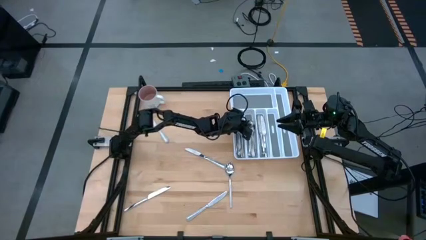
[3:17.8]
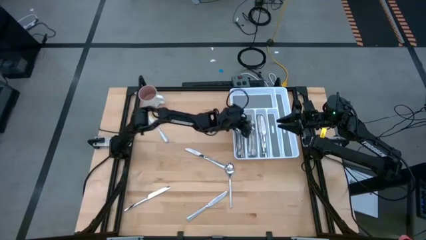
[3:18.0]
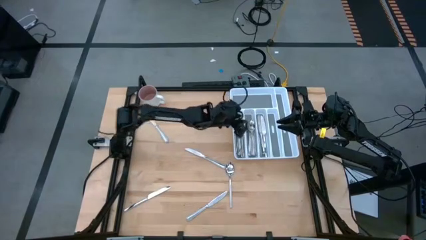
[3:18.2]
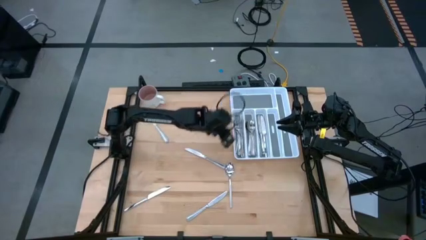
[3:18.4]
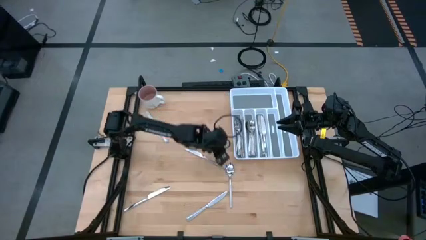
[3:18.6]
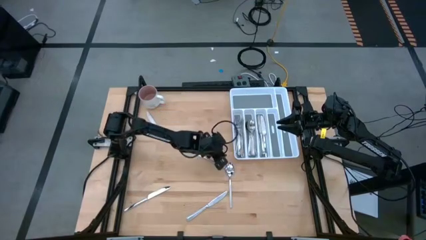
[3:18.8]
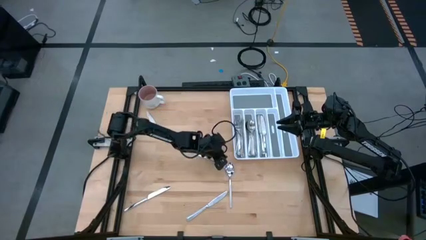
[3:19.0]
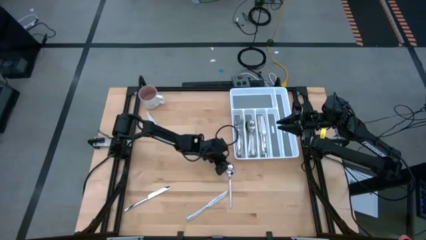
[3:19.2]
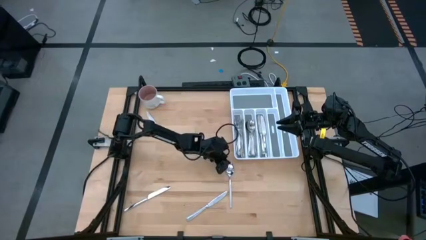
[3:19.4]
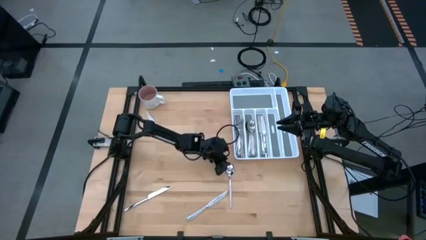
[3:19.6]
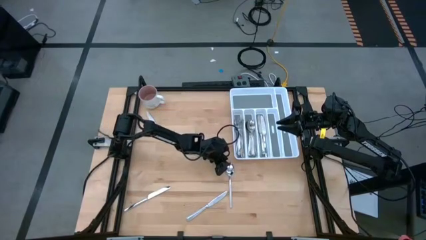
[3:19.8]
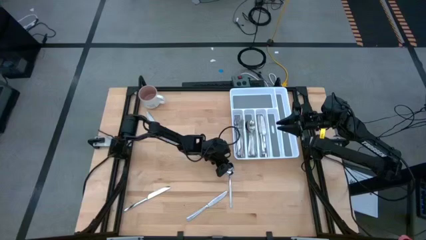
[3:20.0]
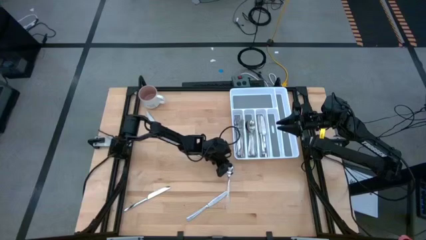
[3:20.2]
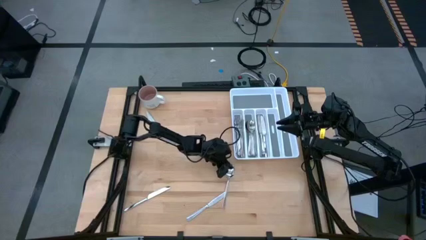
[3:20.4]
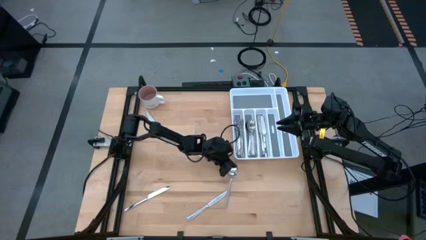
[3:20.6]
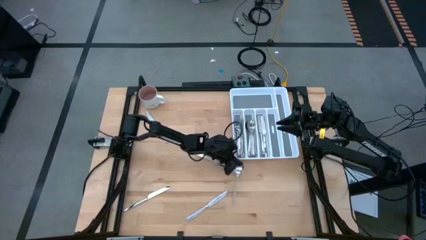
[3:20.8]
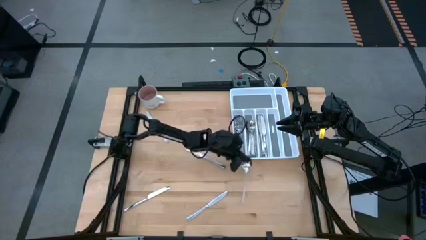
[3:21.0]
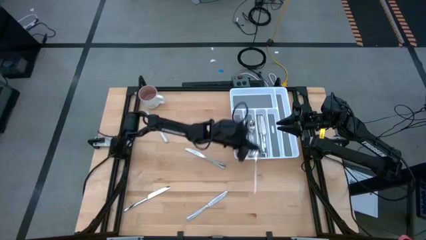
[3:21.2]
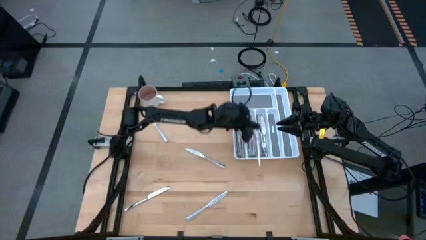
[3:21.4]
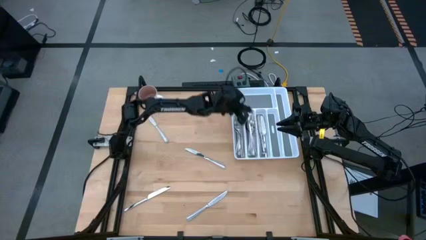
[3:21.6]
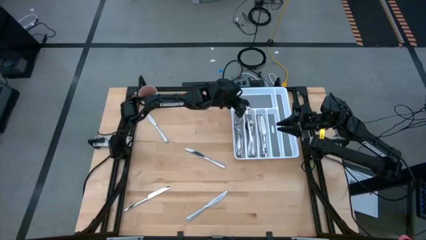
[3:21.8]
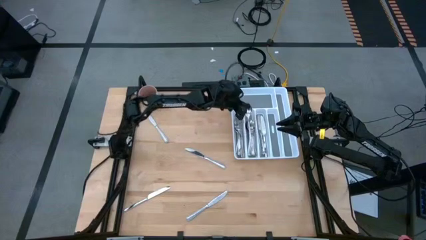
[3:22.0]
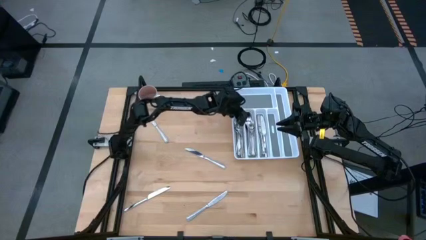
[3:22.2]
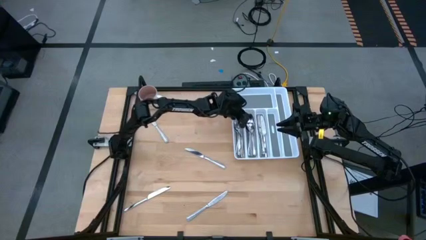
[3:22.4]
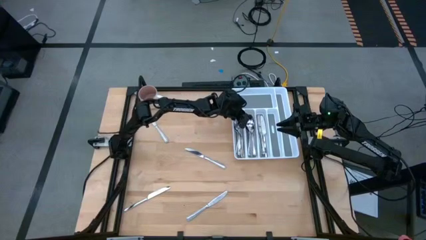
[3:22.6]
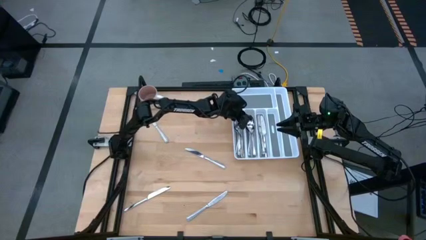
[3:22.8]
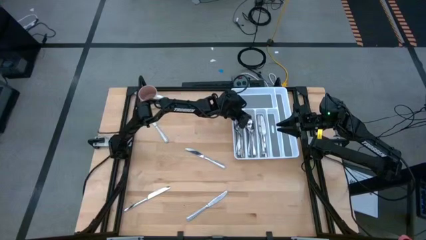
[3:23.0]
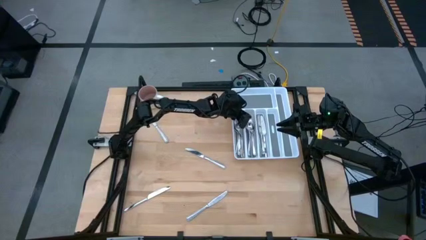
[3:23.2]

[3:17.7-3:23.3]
Task: Sort silverware
Put the silver spoon into the silverware tray

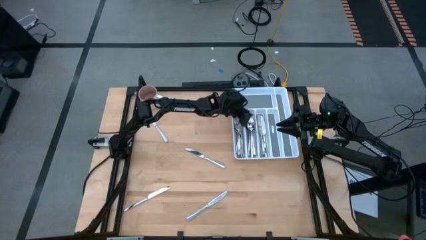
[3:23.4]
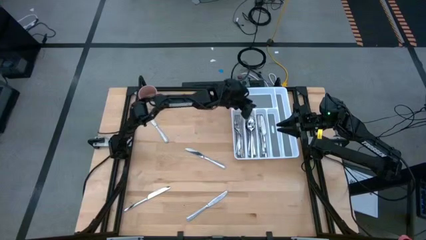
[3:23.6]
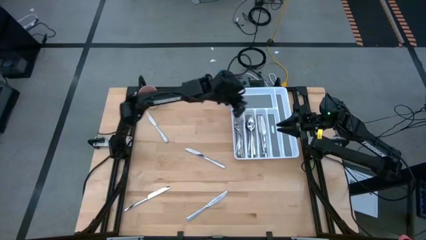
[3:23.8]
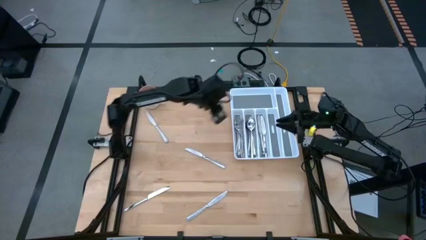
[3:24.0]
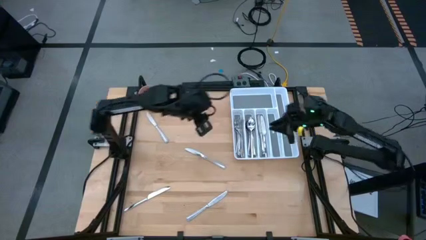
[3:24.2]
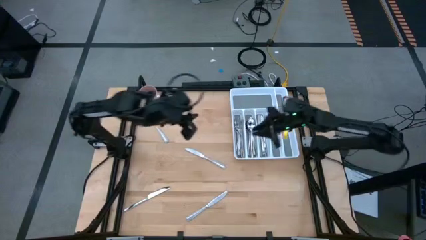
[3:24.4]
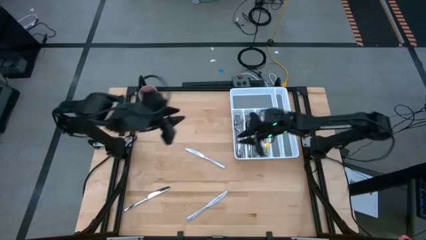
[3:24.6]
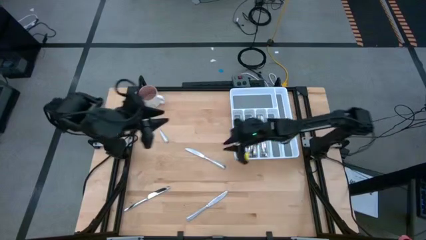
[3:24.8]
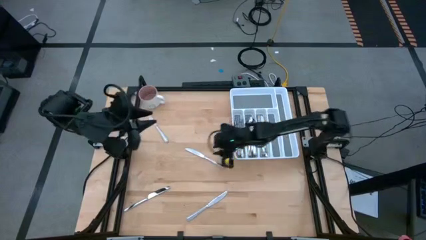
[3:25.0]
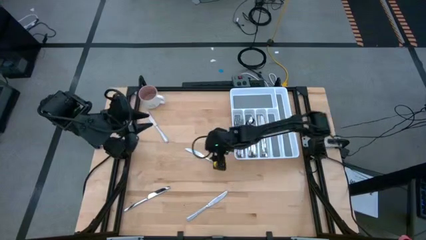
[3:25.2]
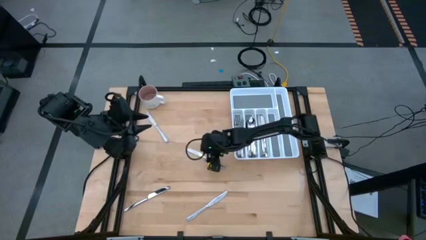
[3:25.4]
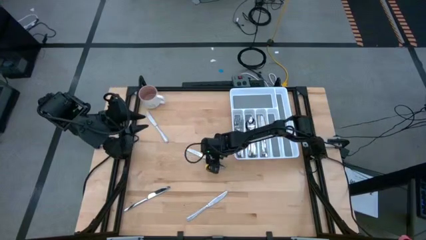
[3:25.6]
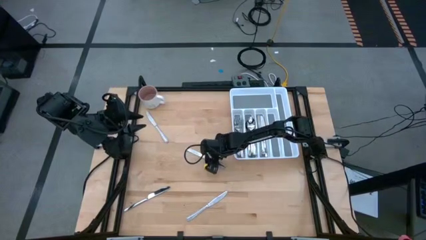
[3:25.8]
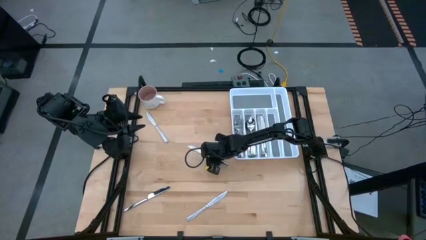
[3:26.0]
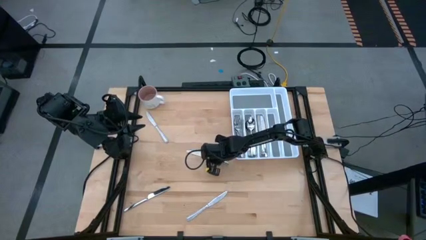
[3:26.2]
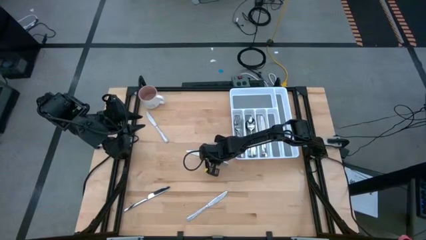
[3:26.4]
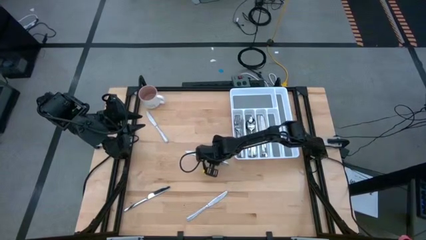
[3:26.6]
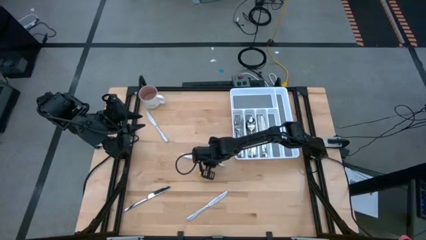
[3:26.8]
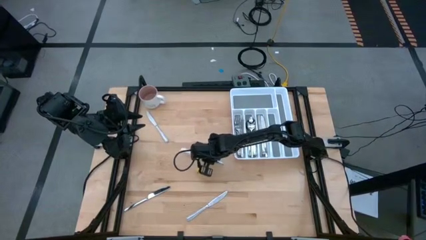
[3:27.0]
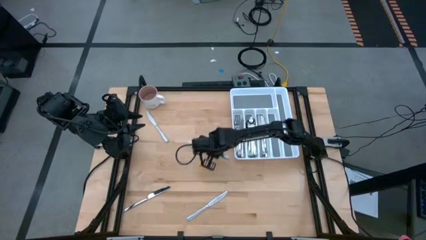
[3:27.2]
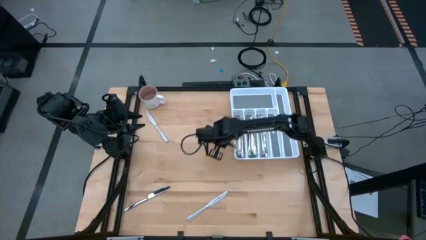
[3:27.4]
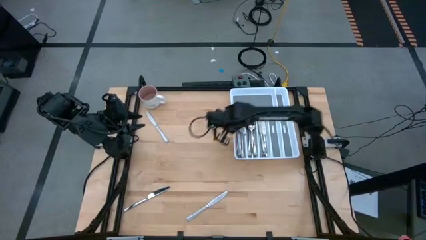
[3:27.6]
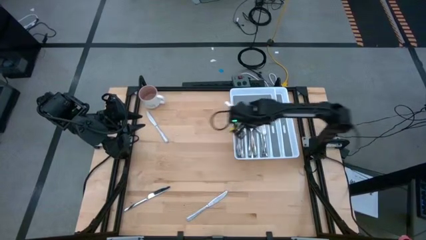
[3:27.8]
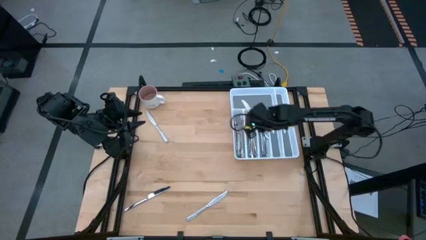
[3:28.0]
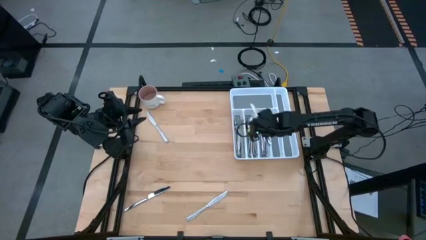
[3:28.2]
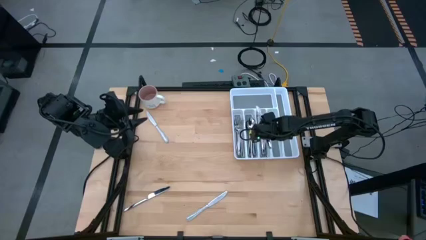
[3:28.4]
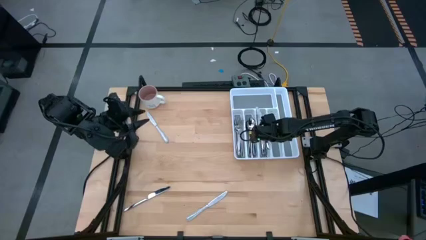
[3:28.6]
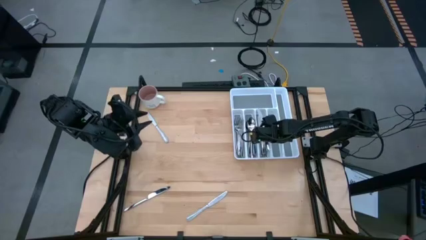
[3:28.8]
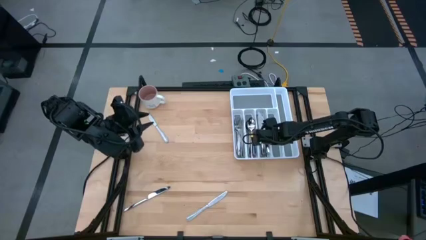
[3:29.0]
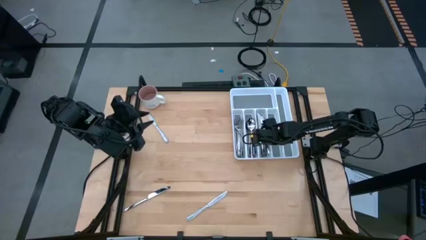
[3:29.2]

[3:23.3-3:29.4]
Put the silver table knife into the silverware tray

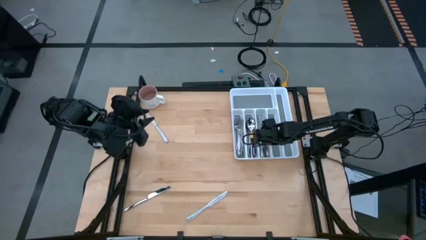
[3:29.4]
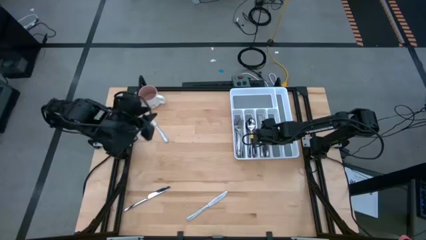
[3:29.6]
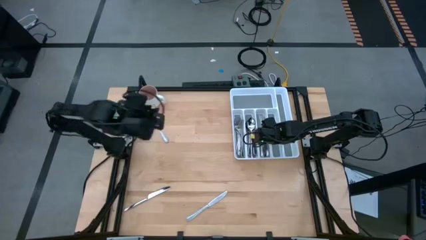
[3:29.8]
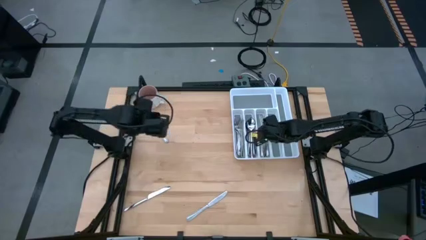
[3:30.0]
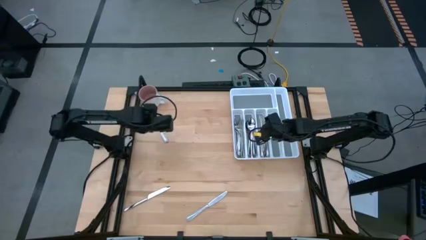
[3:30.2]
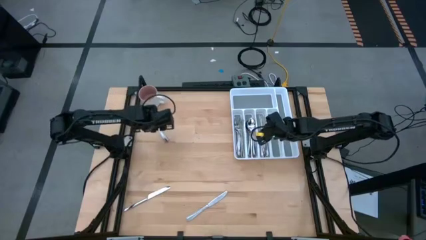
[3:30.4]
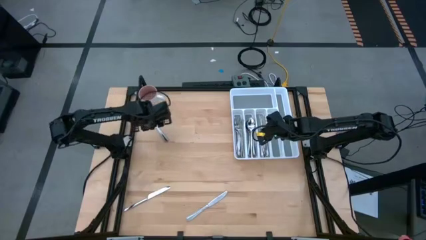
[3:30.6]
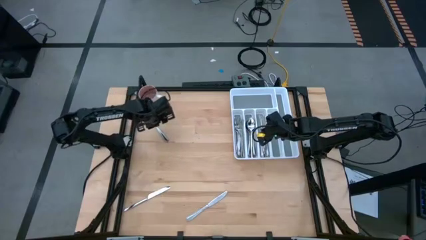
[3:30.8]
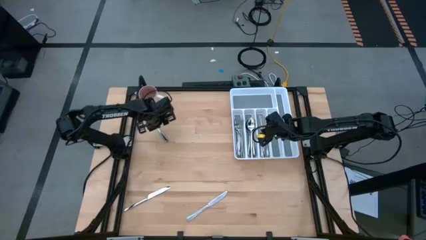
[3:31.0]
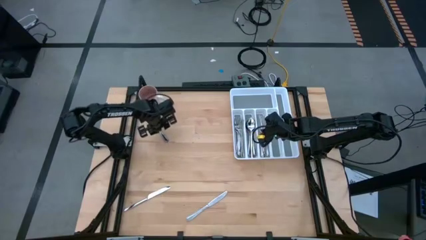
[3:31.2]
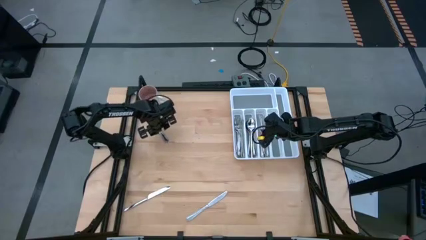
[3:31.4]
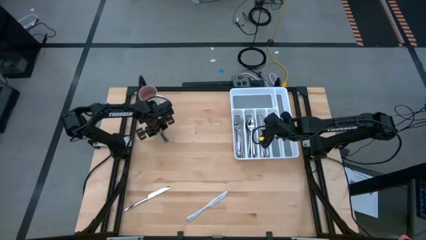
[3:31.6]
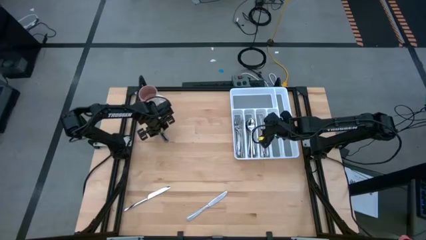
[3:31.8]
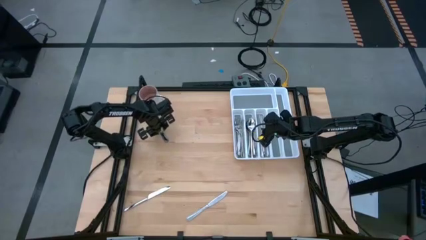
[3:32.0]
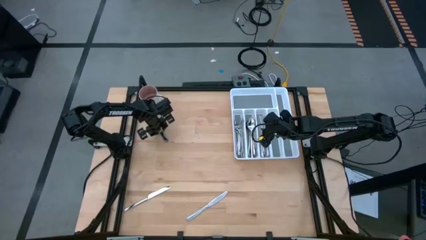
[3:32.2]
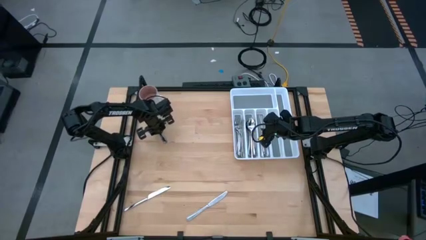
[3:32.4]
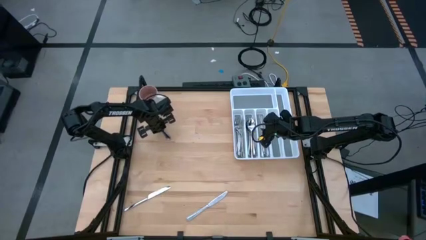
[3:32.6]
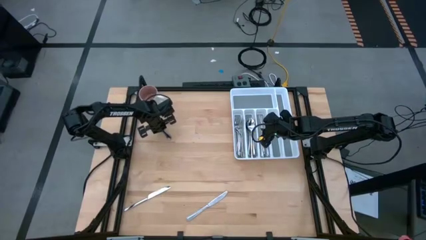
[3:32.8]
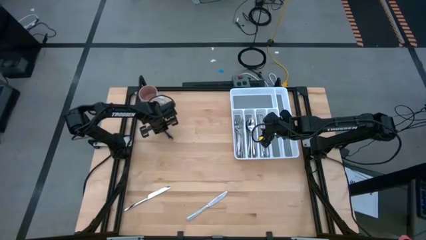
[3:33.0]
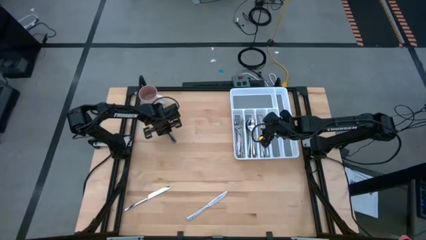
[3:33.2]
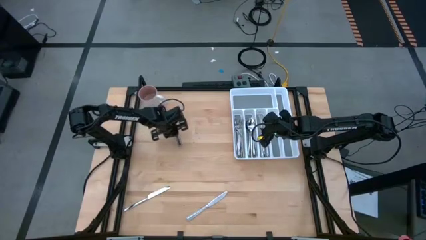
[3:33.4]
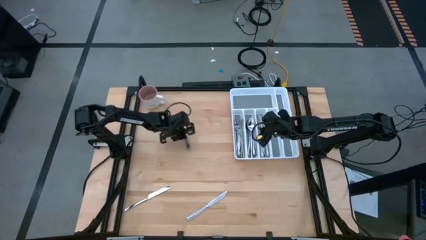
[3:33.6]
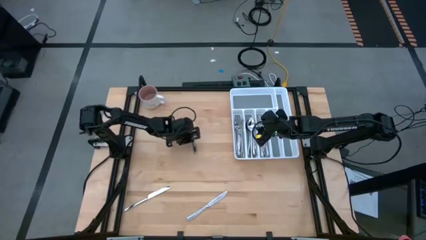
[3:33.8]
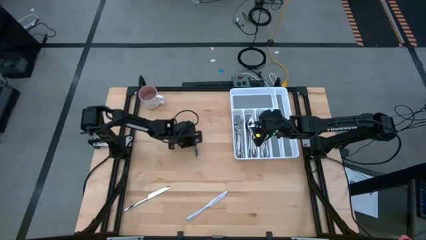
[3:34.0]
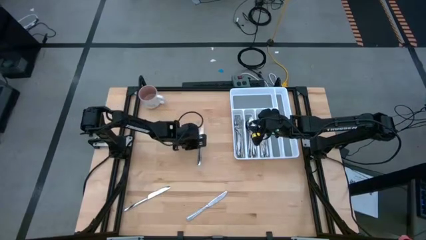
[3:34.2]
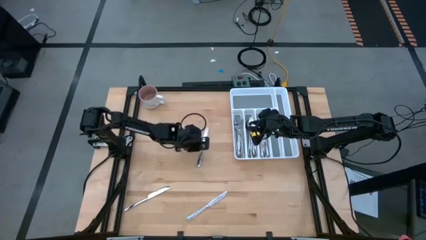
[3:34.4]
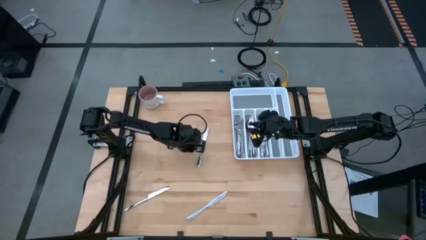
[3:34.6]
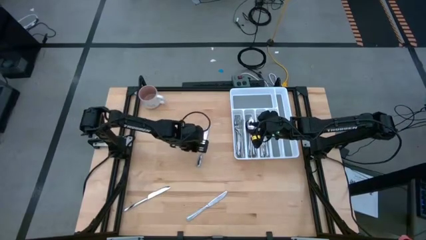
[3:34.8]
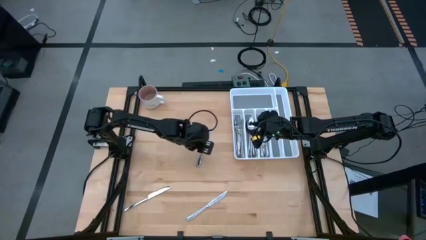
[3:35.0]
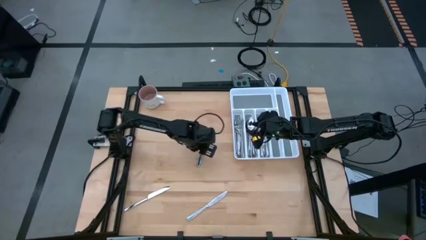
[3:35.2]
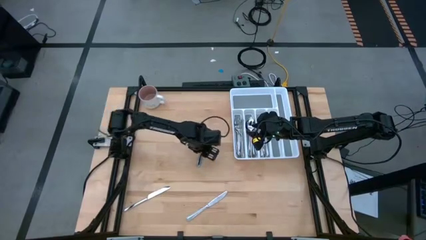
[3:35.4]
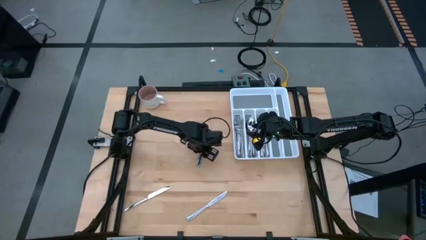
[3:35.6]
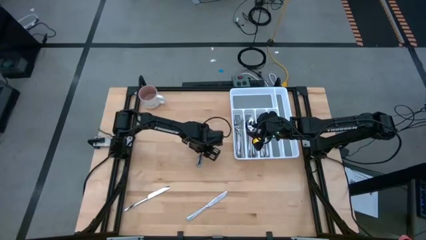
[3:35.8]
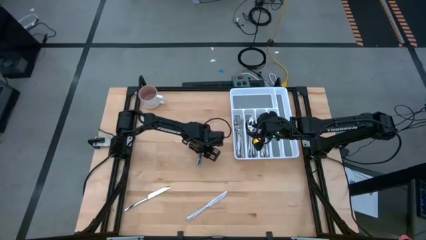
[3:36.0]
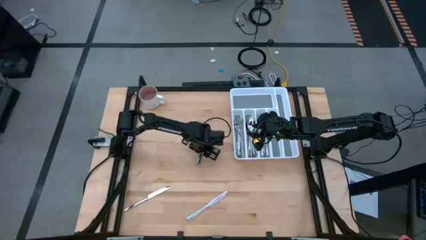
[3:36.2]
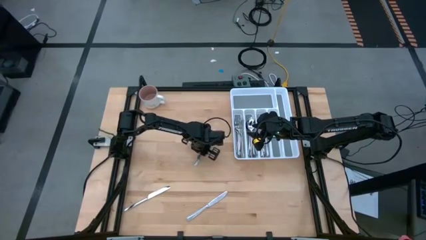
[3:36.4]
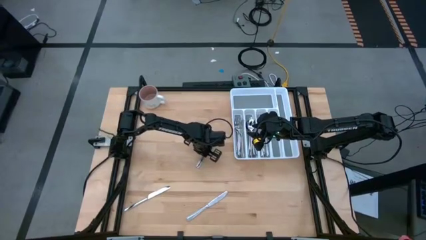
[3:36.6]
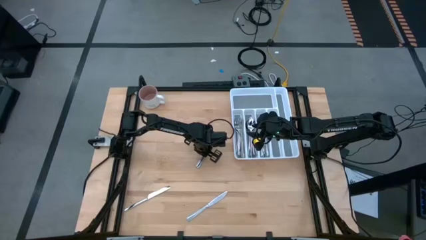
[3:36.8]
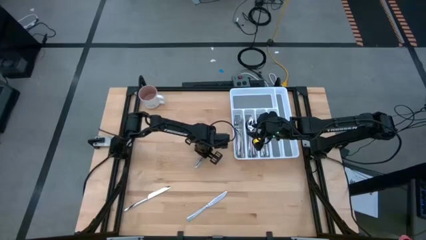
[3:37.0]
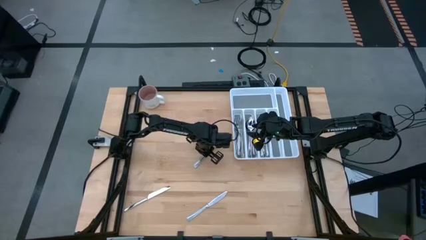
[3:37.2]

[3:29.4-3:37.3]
Put the silver table knife into the silverware tray
